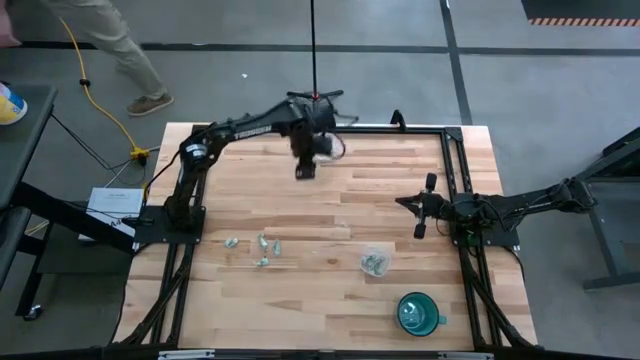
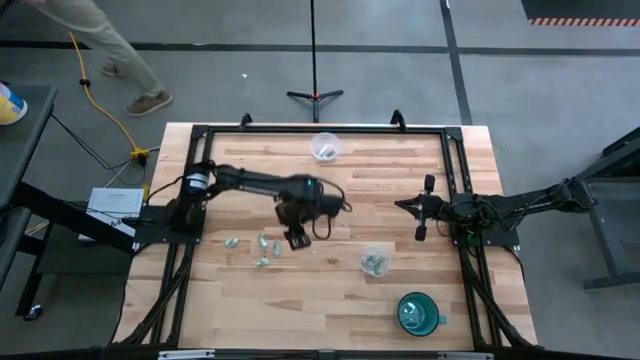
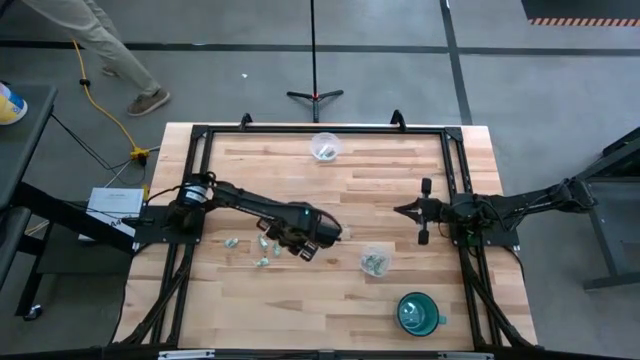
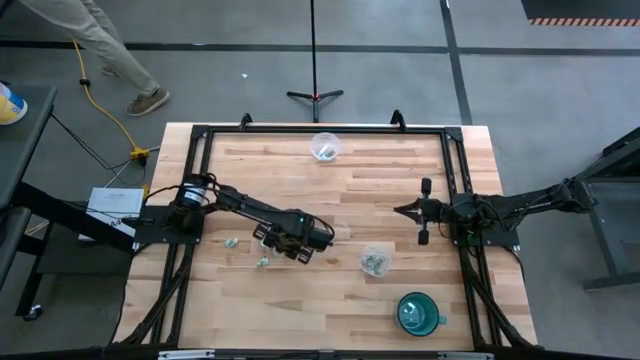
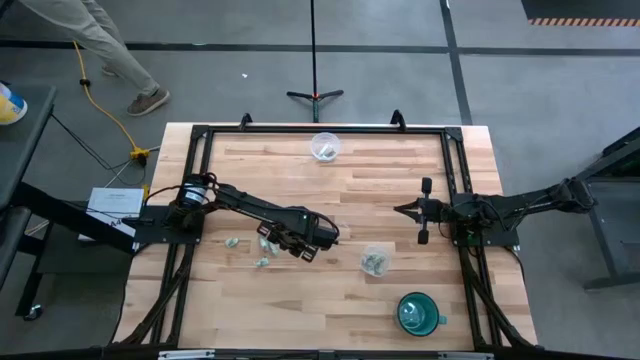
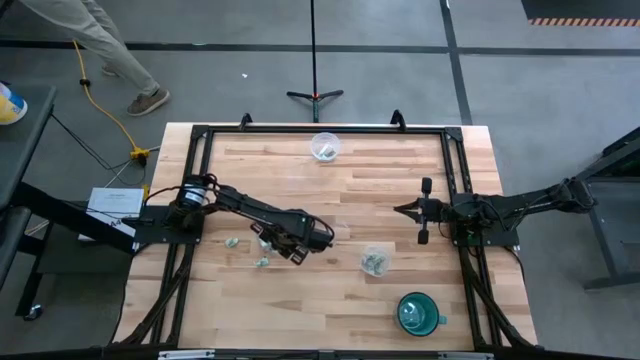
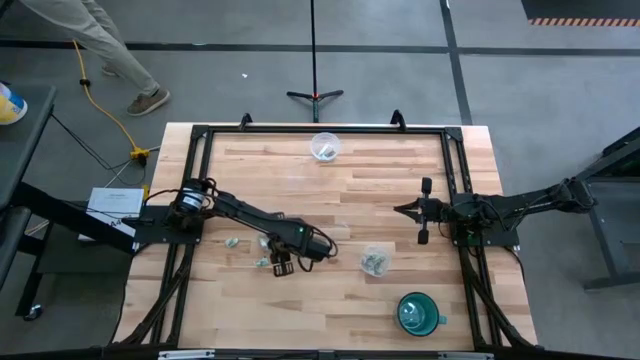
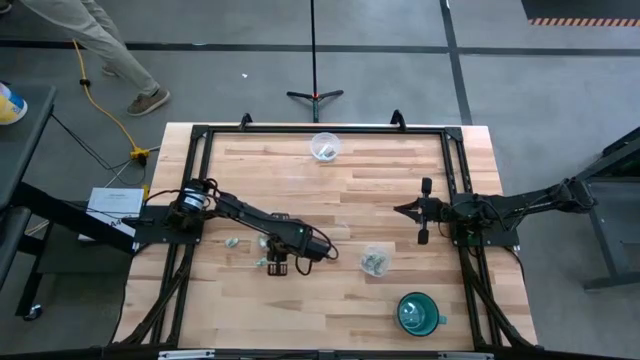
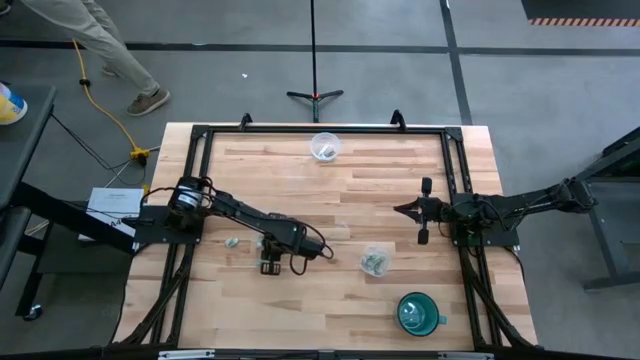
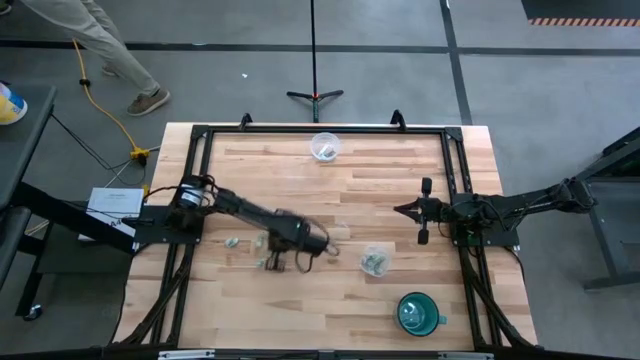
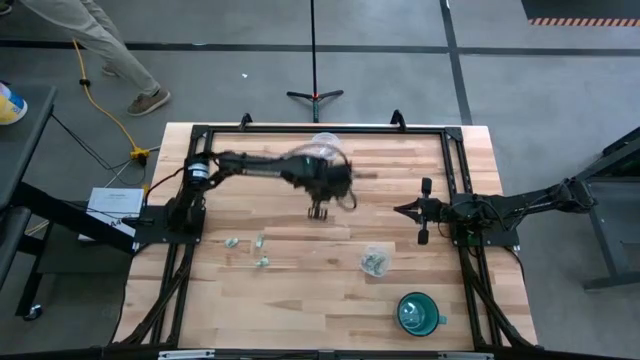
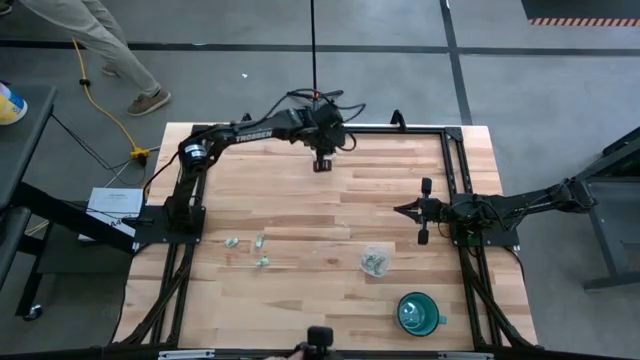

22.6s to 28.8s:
Task: Pick and place Stevia / Truvia into bins
Put the light green stevia packet into the top transparent container

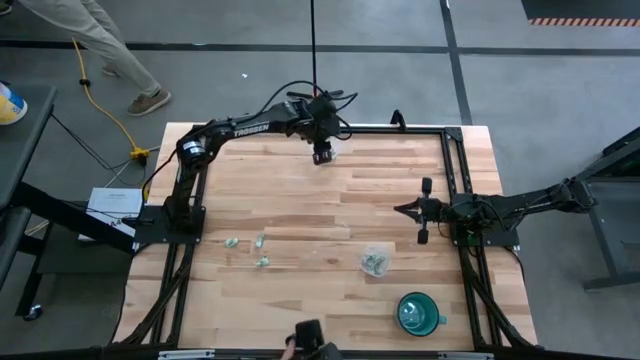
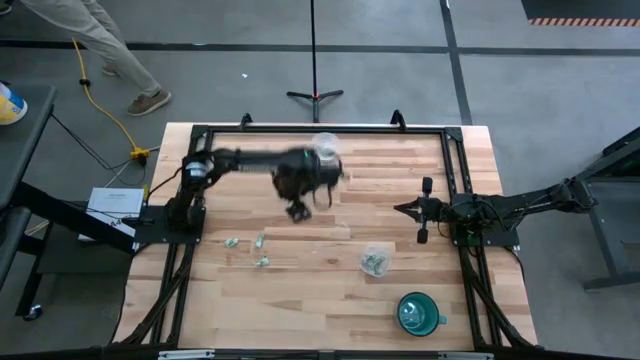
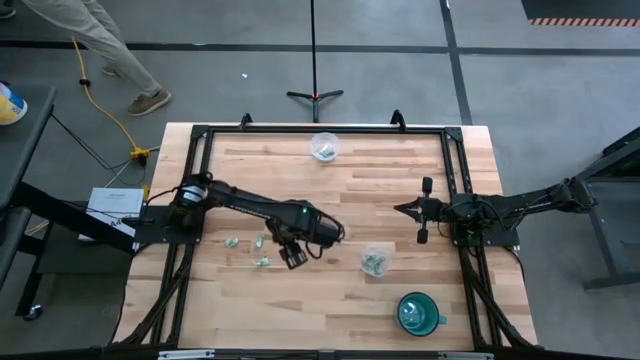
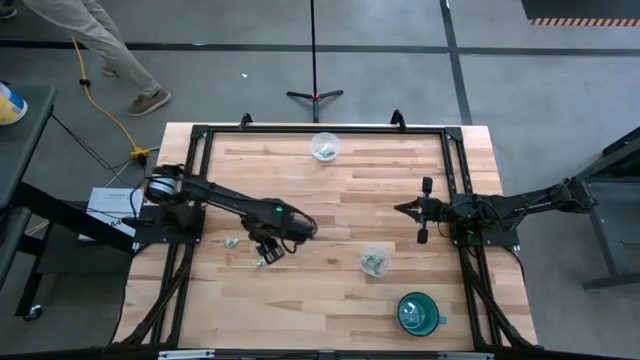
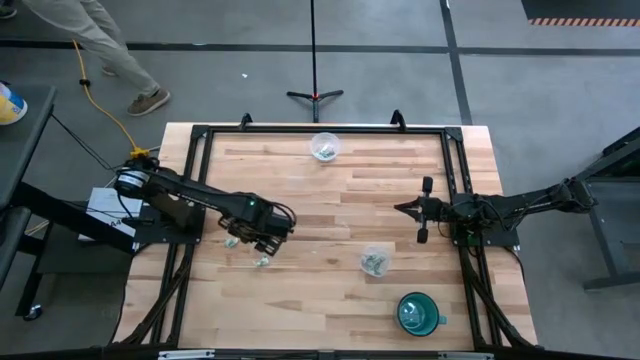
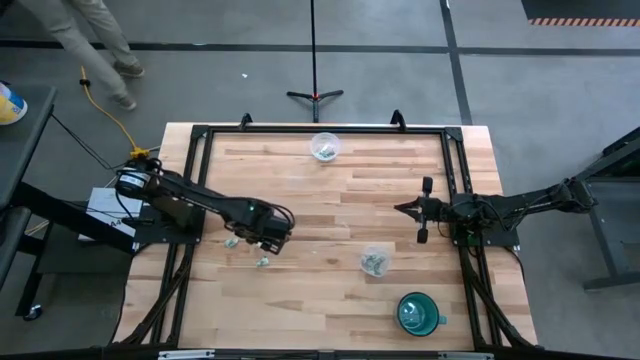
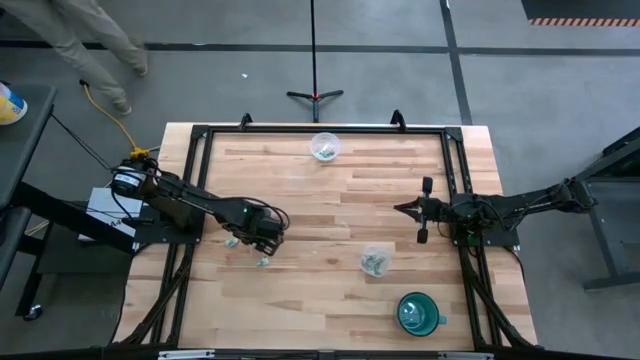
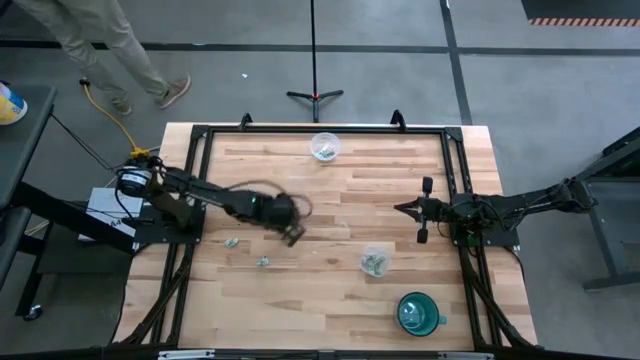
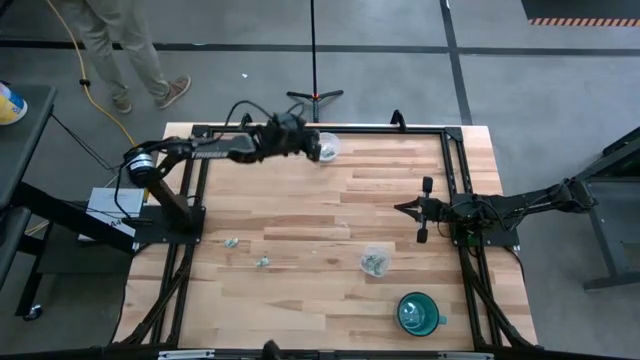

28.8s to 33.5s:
Put the light green stevia packet into the top transparent container

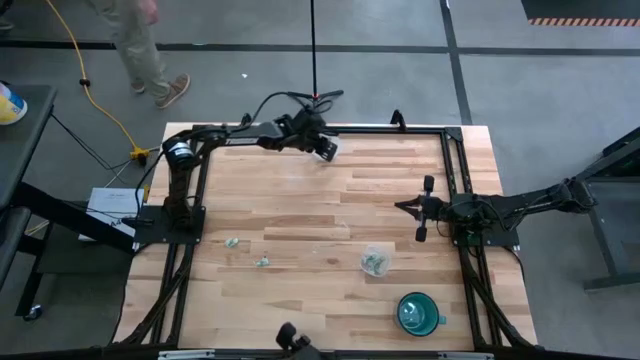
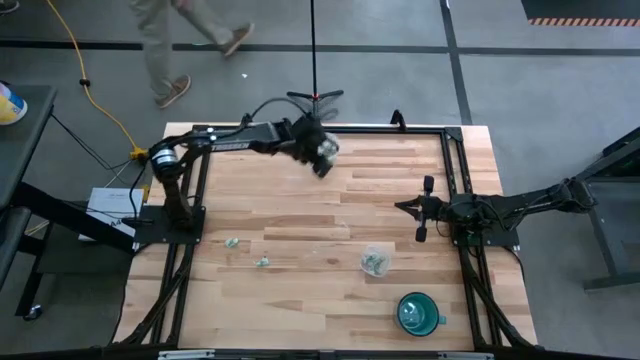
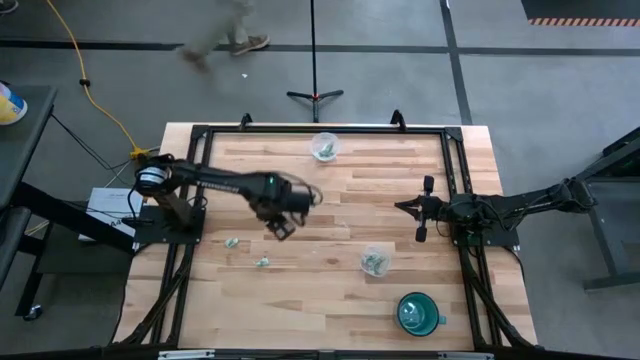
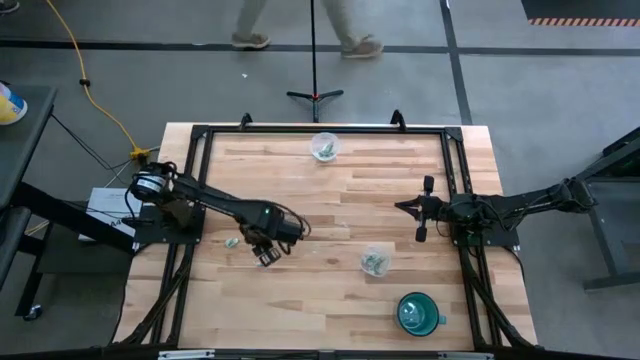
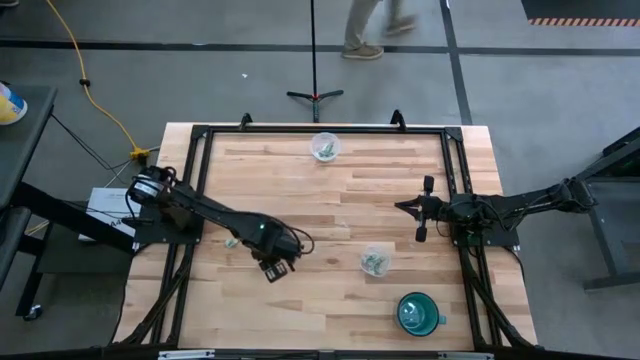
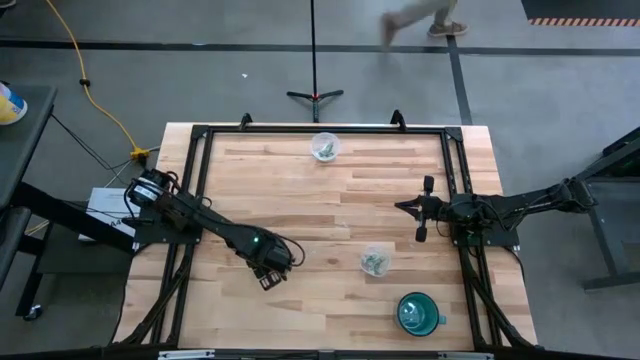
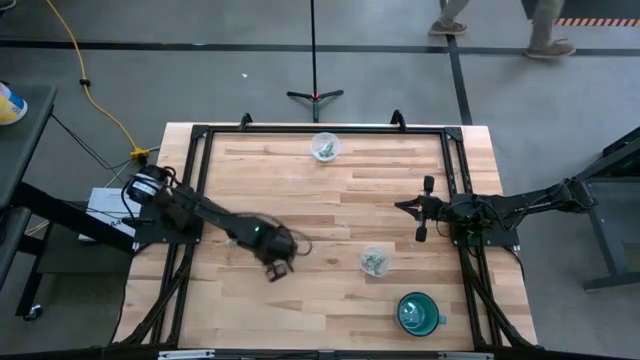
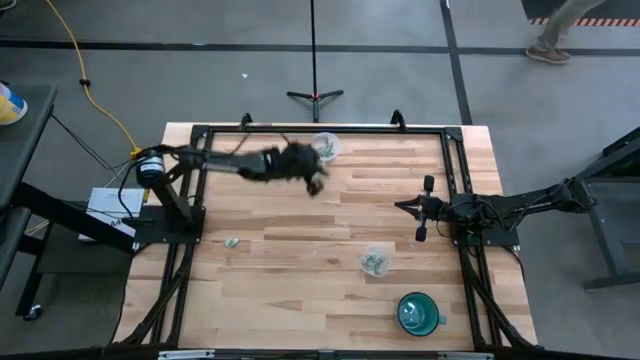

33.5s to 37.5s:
Put the light green stevia packet into the top transparent container

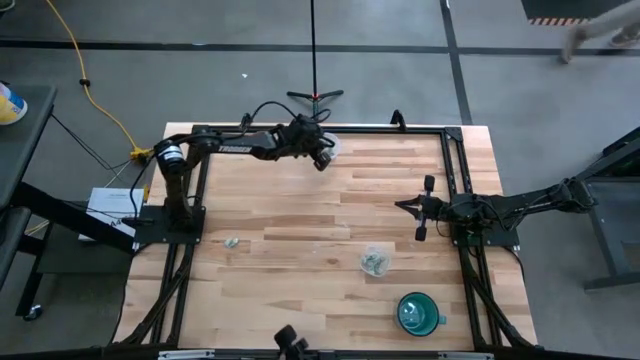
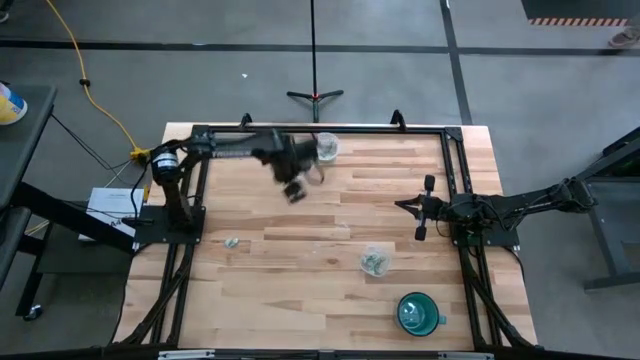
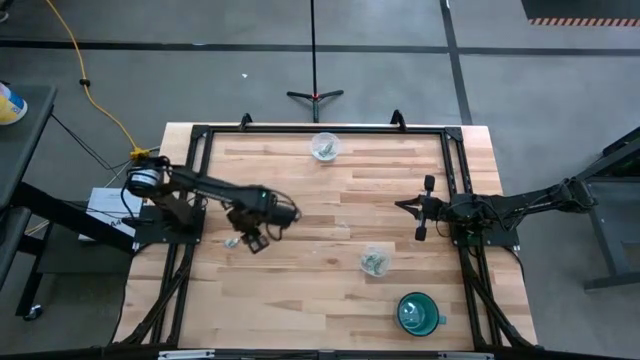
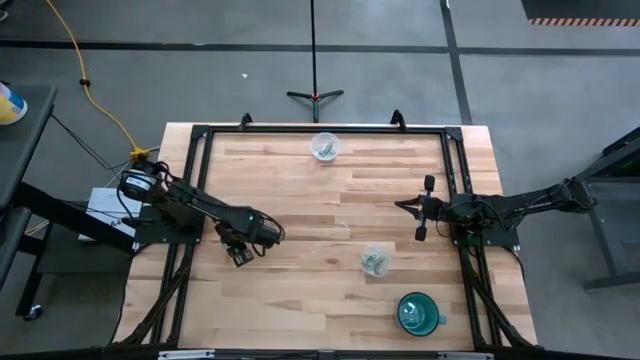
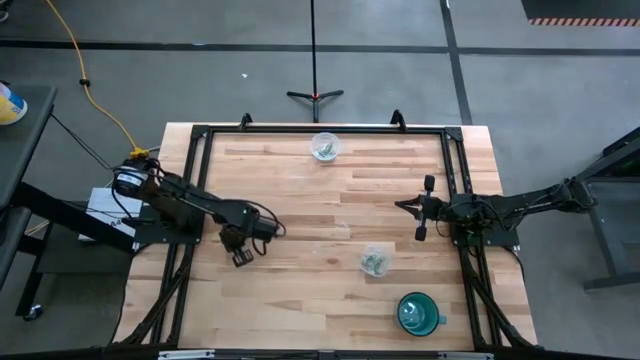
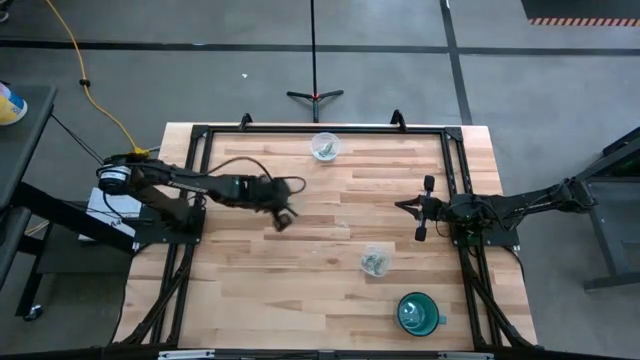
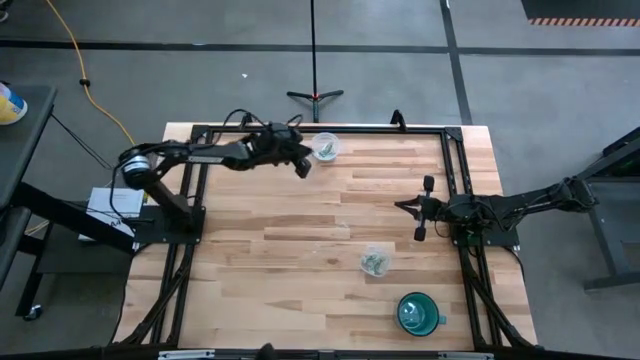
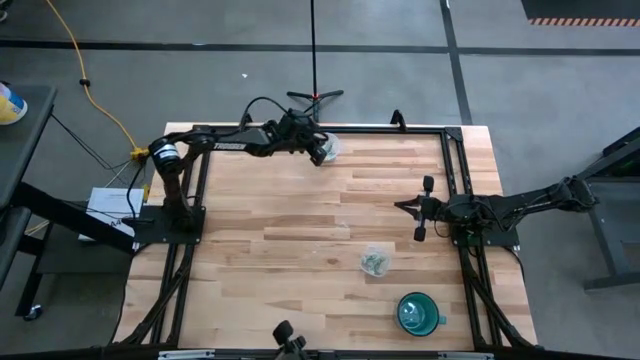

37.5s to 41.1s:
Put the light green stevia packet into the top transparent container

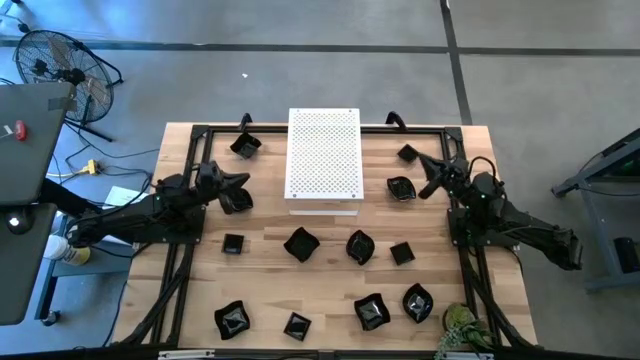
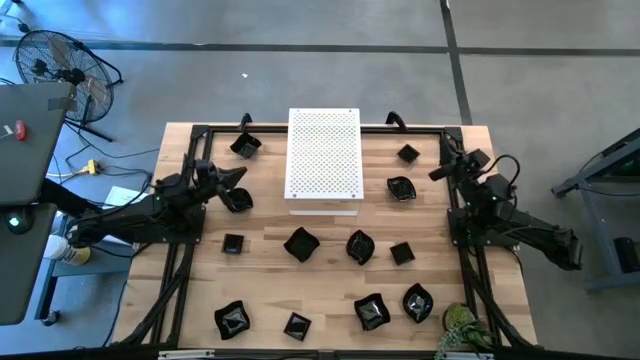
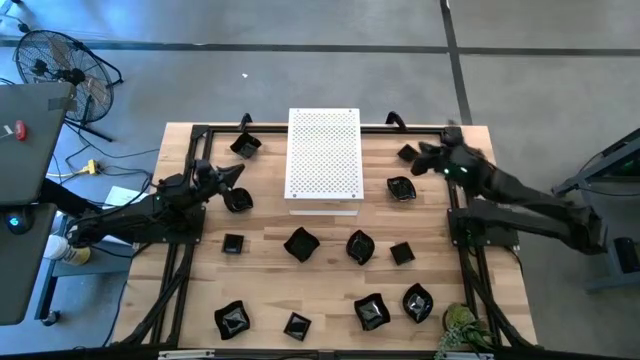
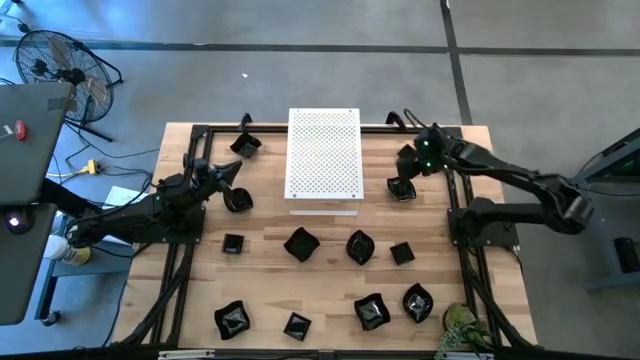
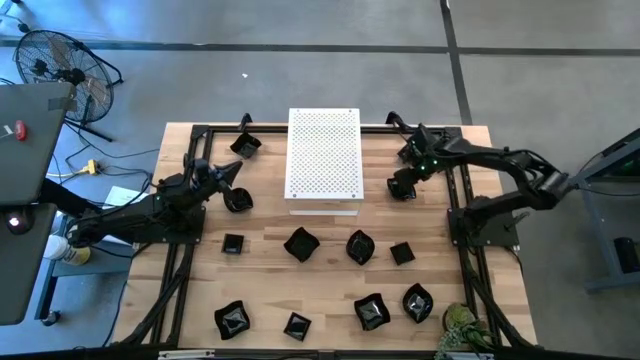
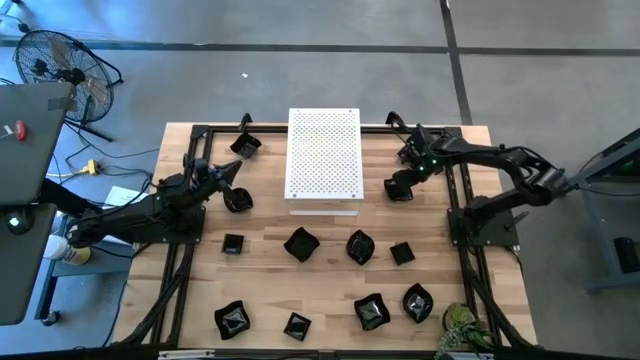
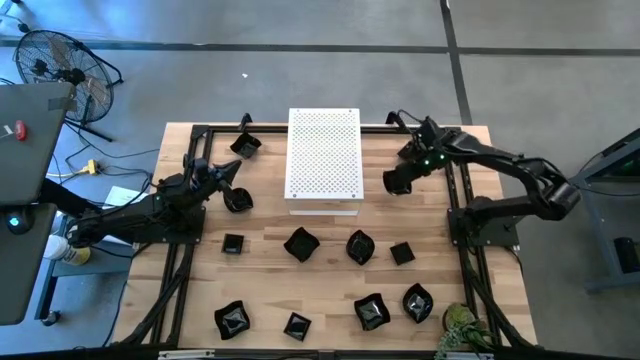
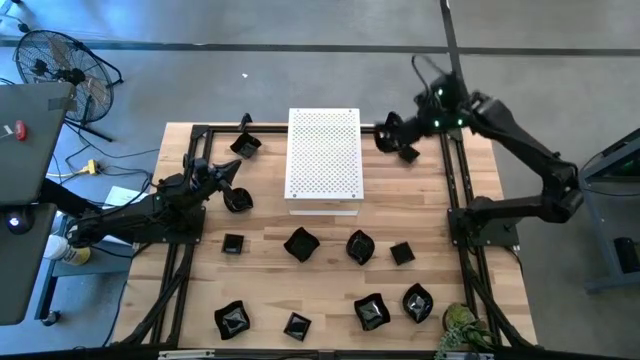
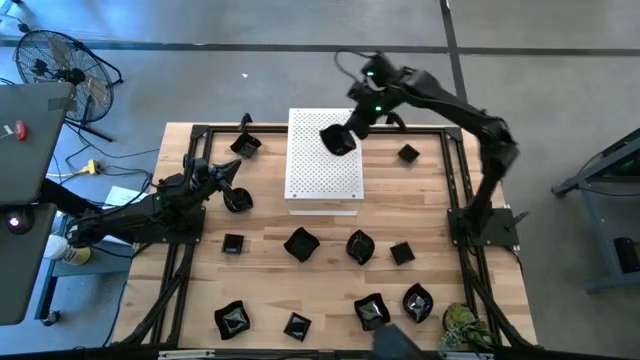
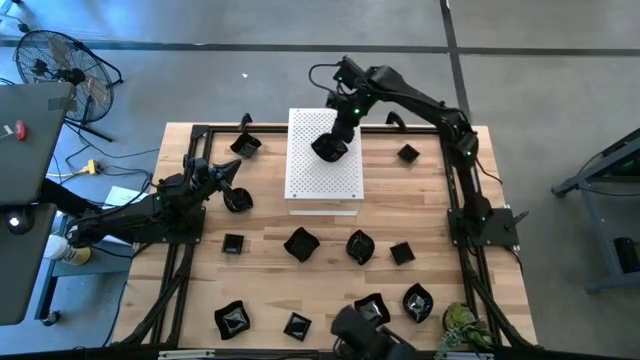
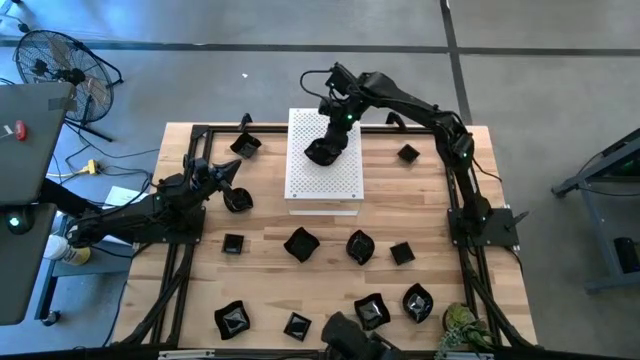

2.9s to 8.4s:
Task: Pick & Place Mini shaped plates
Put the black leaf shaped plate on the shelf
